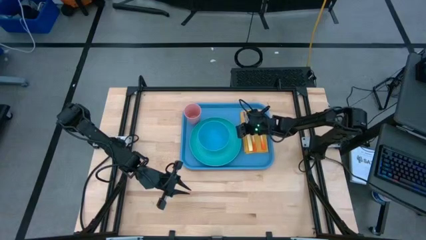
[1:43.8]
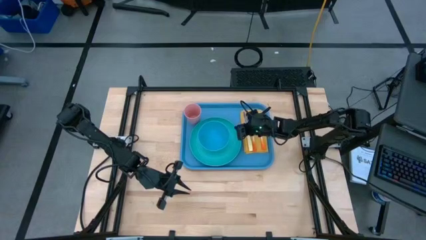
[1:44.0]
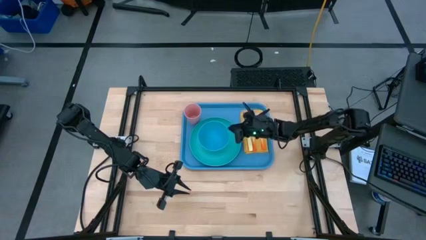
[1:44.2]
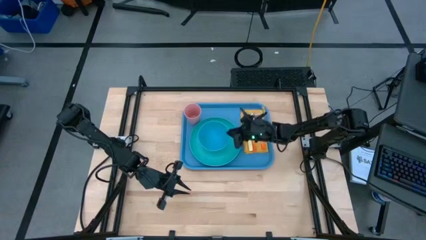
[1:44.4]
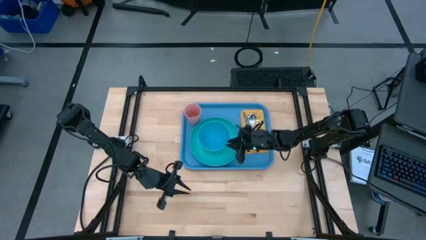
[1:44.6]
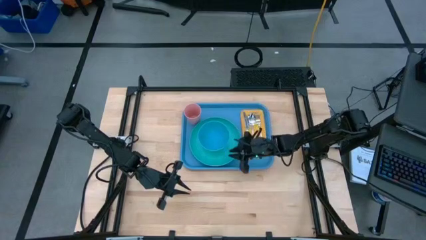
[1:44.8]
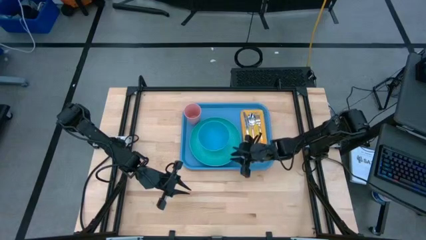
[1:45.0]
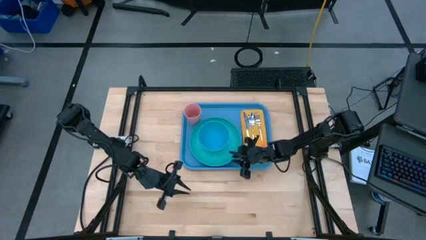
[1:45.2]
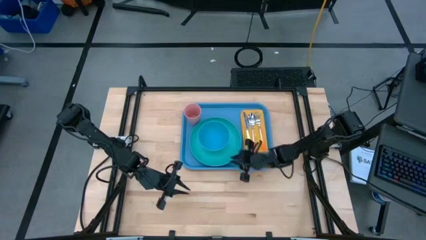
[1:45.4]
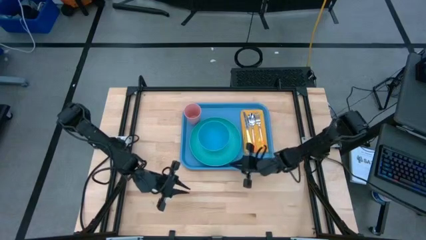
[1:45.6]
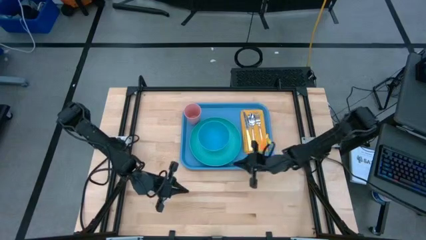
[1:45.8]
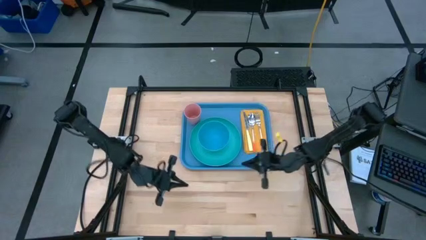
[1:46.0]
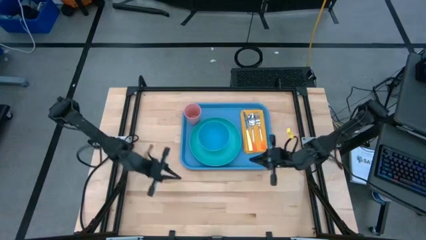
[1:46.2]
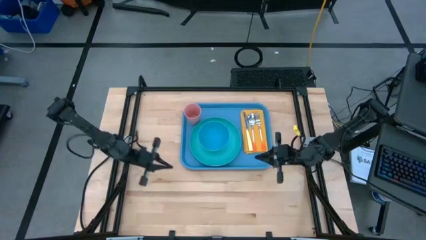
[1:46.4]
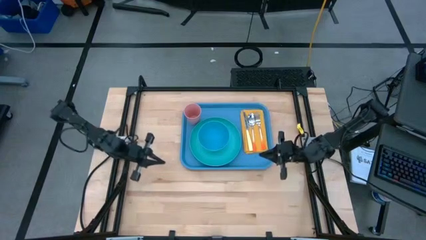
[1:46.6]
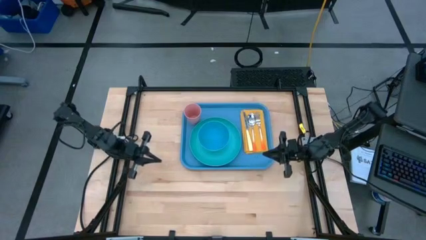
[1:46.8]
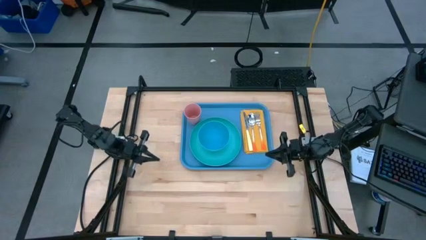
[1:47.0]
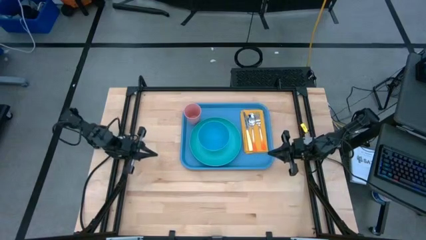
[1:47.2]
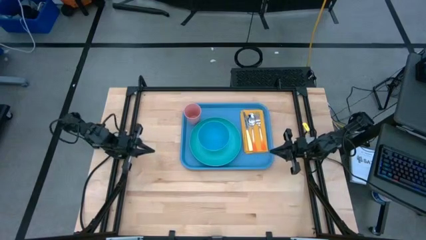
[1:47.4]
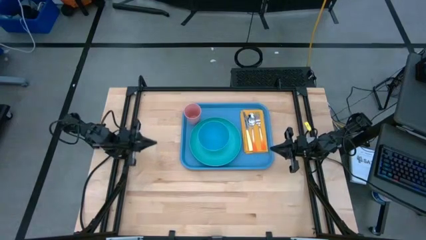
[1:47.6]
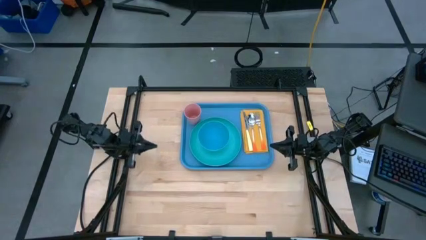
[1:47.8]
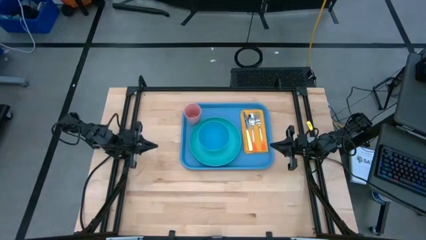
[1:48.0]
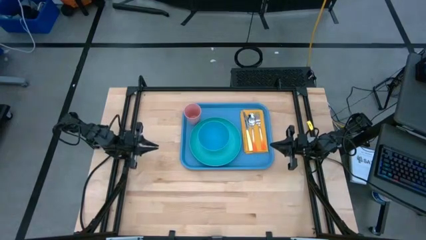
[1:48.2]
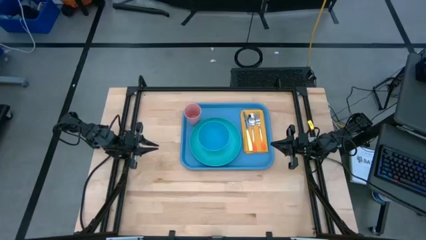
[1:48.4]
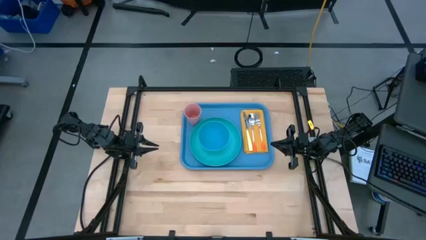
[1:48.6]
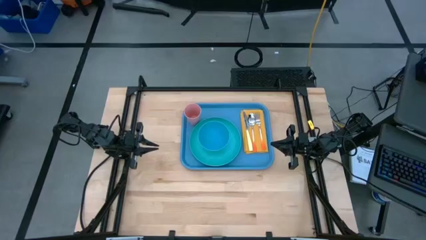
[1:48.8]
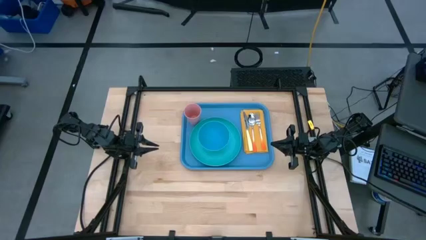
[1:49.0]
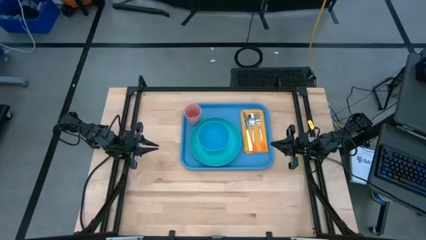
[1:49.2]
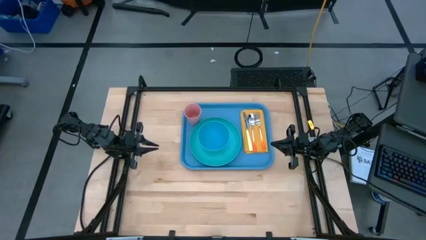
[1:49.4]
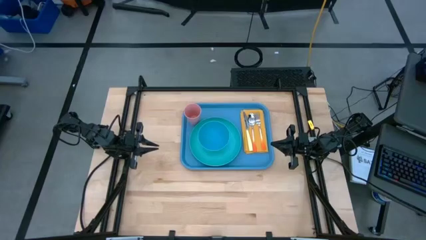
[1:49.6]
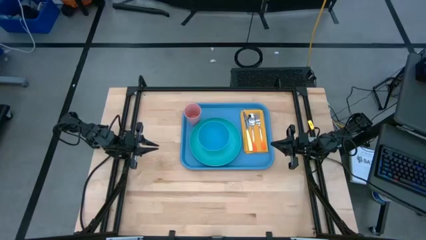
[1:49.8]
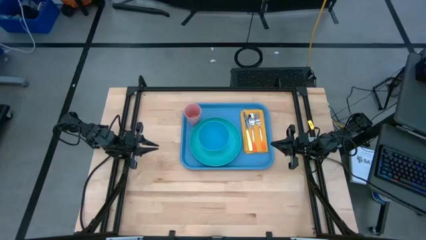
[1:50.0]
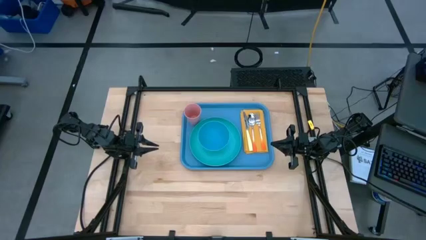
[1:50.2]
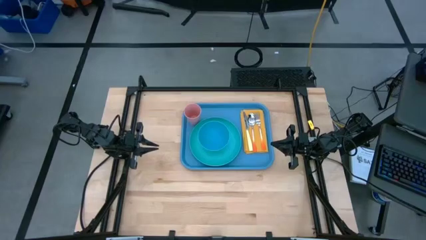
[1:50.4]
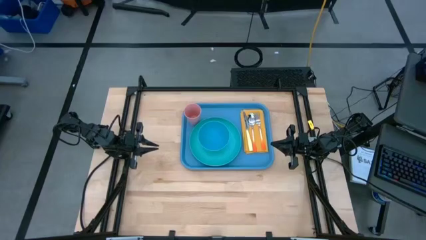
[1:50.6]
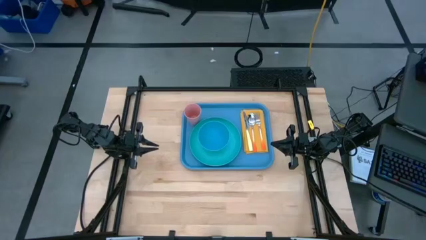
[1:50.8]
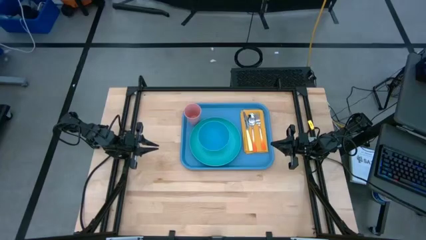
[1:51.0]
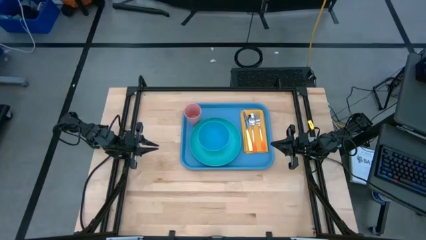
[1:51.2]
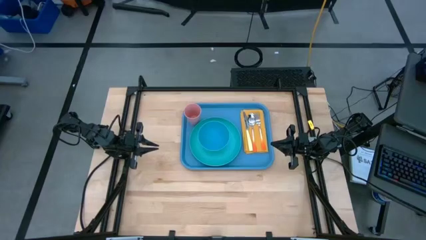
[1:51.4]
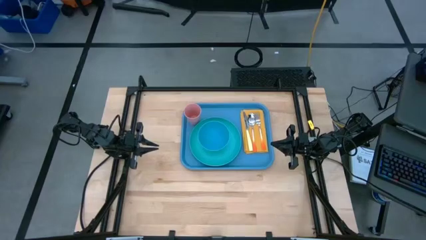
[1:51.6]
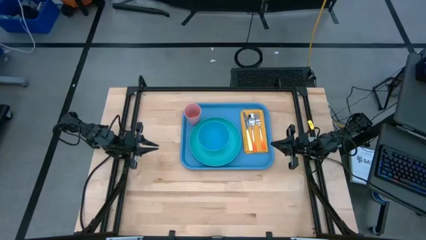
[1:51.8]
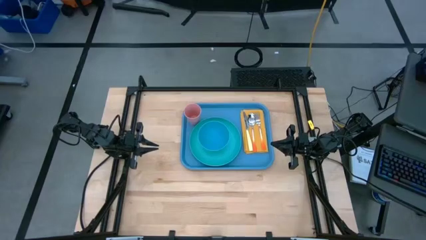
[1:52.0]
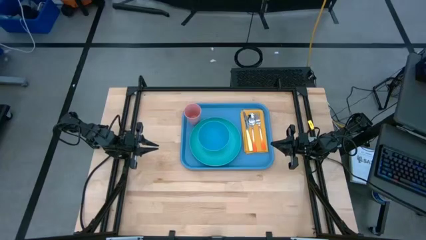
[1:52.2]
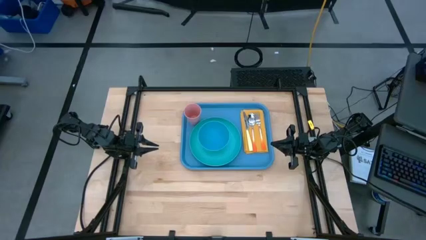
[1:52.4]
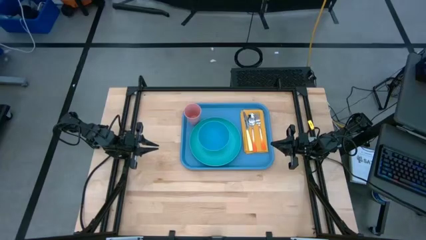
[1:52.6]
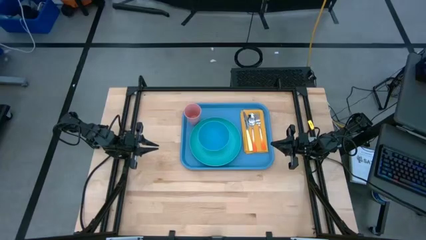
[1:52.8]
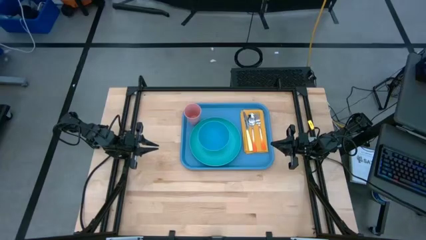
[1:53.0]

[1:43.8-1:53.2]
Task: Set up tray
Return to Home Position

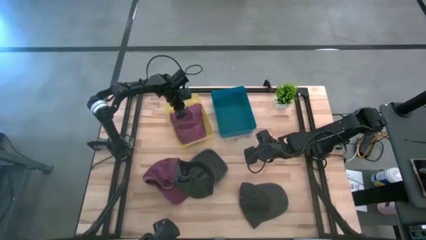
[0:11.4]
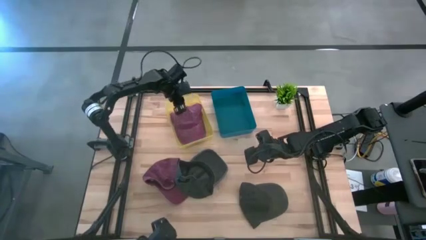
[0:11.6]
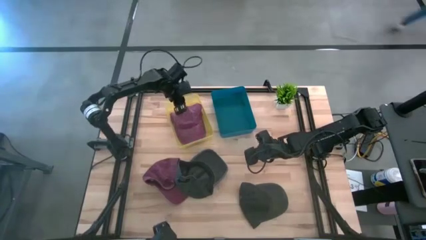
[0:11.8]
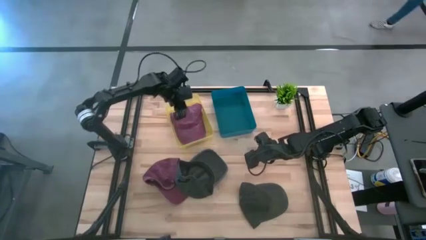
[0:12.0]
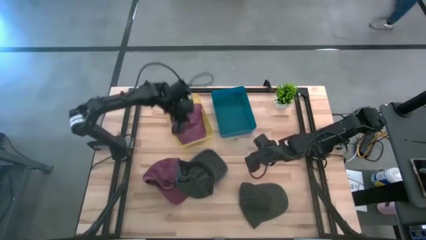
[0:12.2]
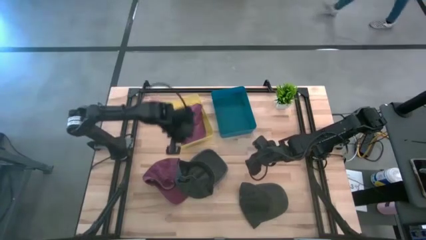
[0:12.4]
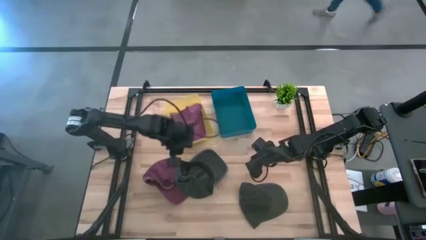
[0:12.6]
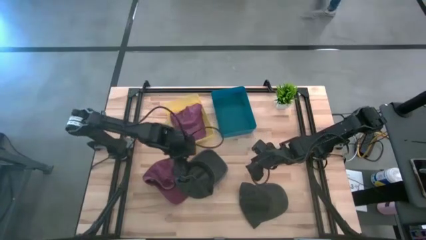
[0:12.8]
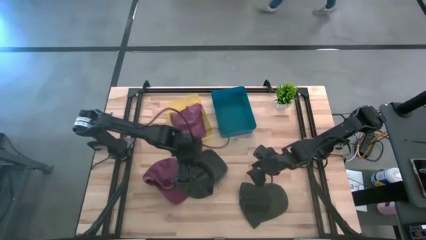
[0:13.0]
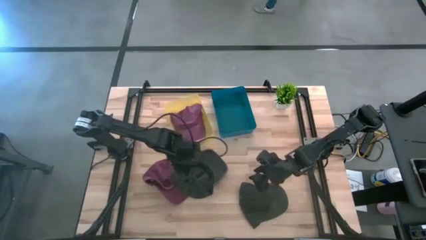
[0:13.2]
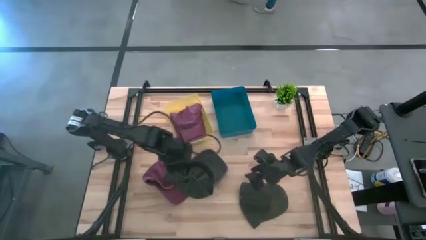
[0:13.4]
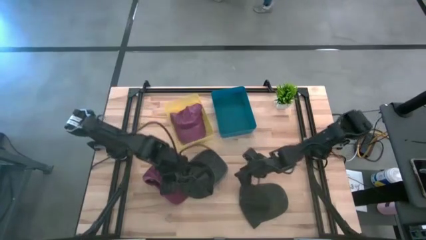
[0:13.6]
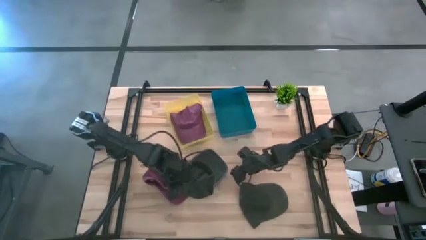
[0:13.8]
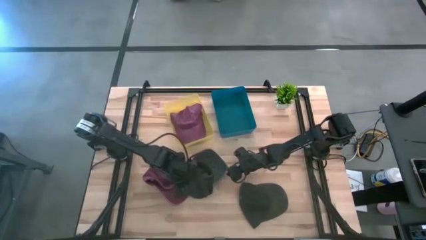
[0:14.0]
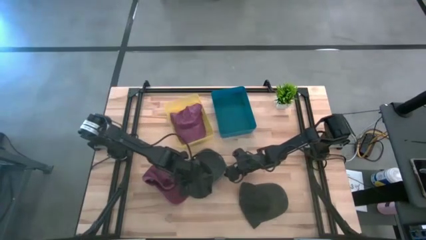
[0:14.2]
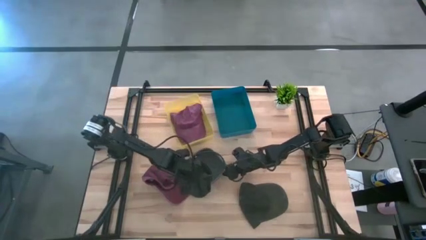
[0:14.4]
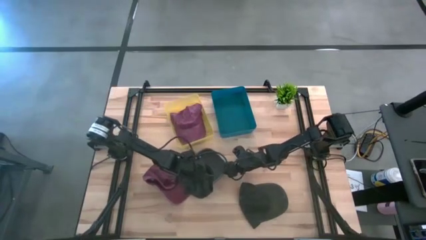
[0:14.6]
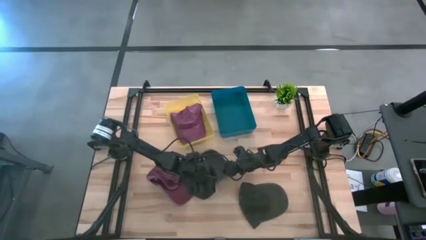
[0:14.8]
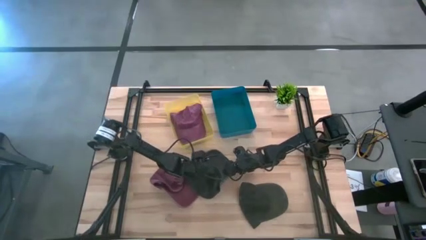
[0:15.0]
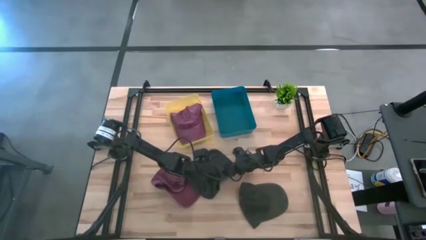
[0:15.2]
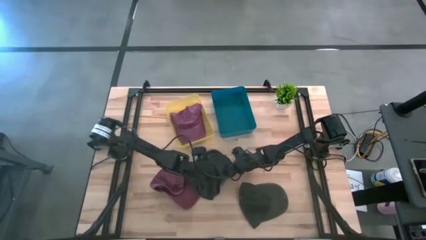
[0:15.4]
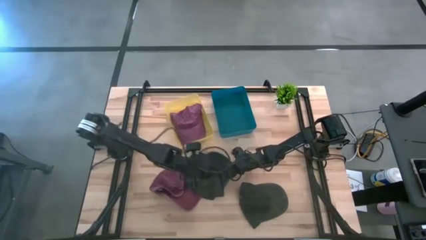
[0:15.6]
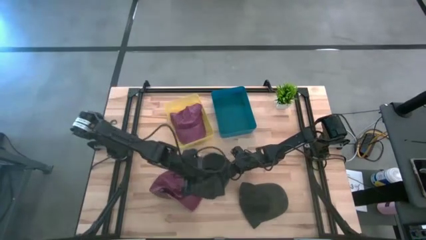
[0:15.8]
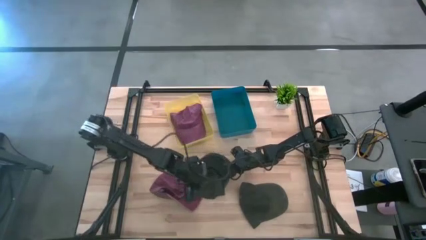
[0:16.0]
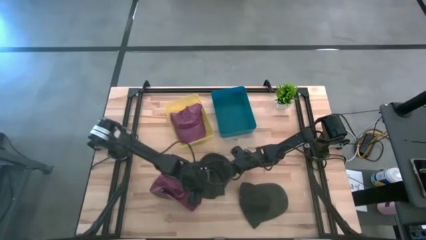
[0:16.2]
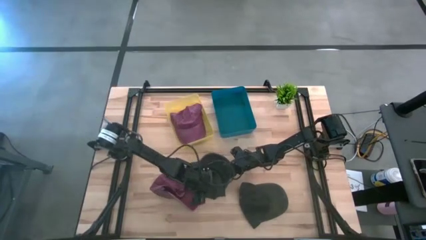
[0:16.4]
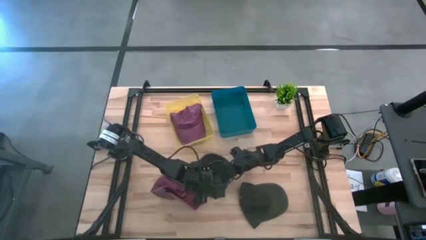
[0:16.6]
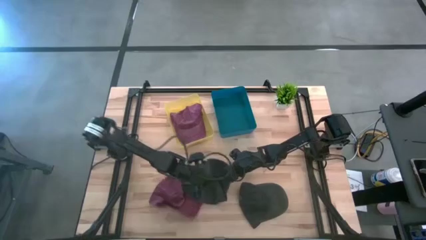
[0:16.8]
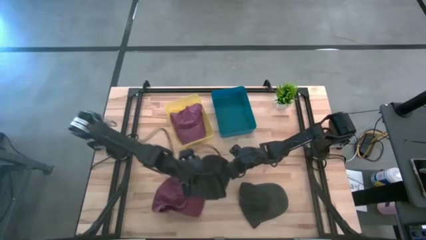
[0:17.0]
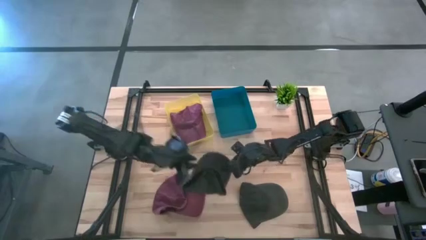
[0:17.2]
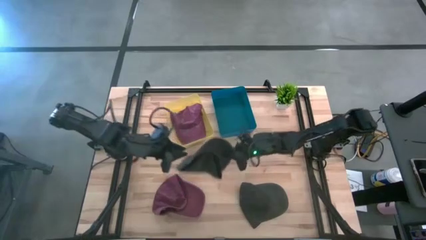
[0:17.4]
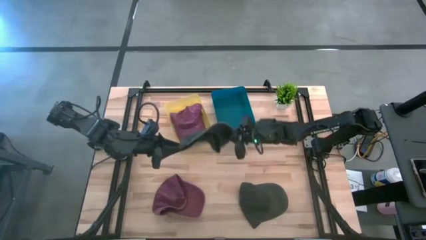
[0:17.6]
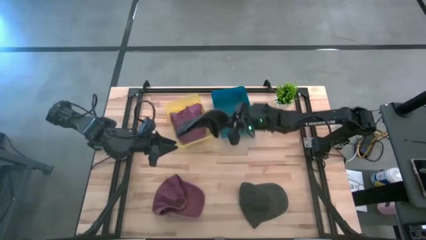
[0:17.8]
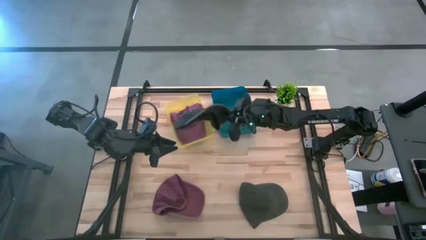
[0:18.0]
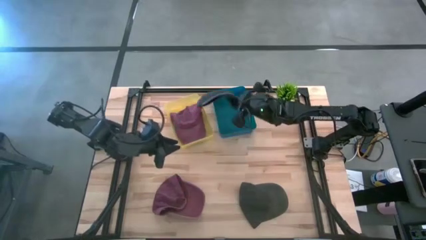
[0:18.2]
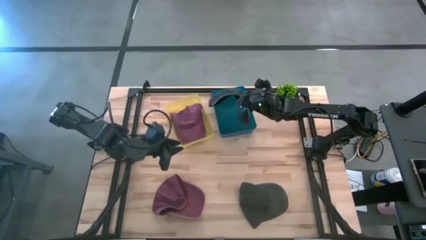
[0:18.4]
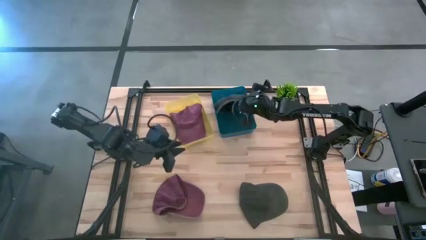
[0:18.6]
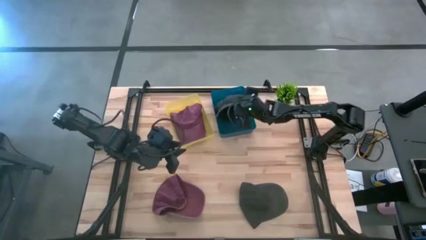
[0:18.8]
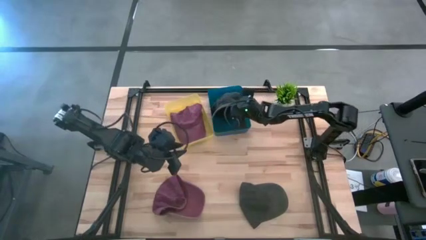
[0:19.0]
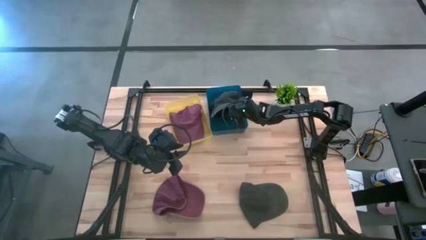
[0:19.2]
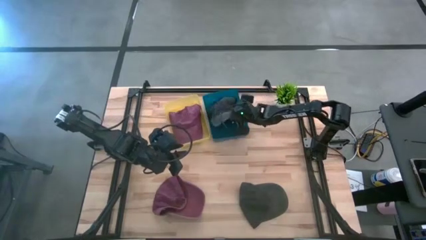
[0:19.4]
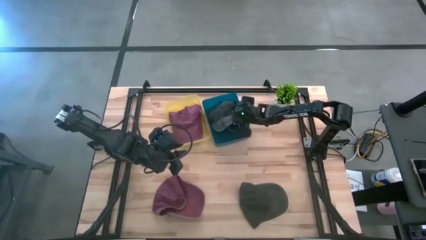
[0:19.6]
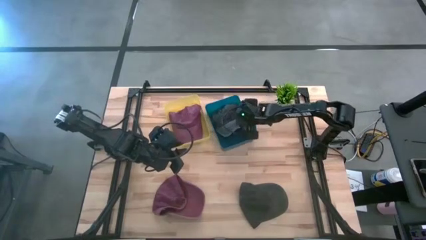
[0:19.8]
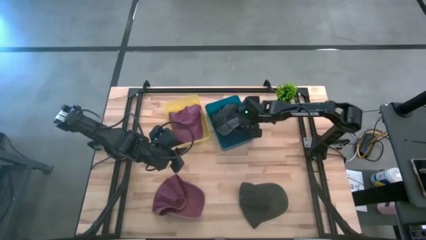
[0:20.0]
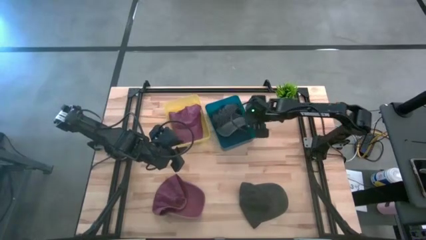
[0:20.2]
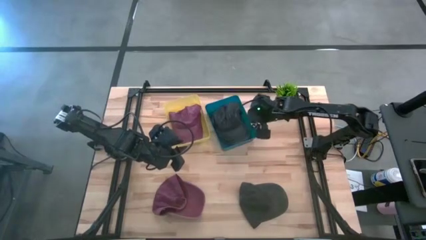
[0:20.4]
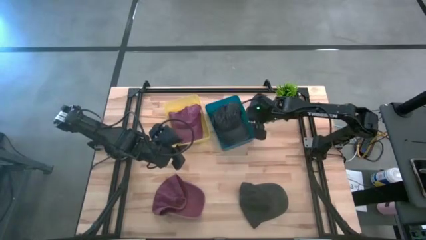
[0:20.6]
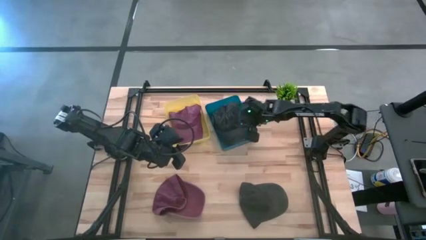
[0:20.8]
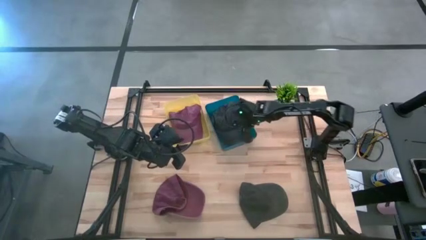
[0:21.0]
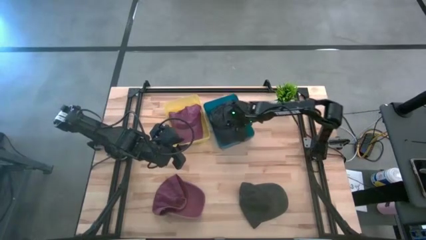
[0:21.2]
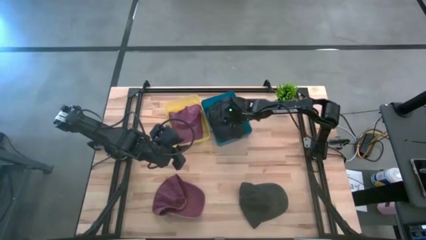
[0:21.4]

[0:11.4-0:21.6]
Task: Pick & Place hat
Put the left gray cap into the blue bin
